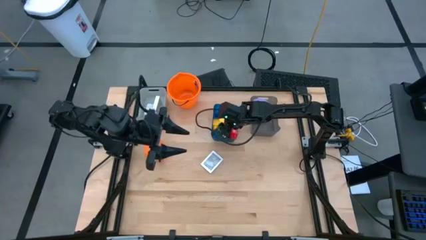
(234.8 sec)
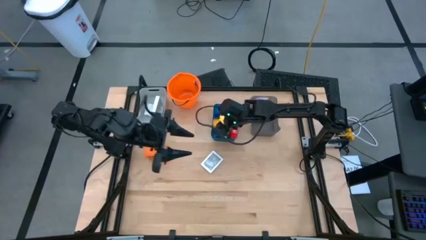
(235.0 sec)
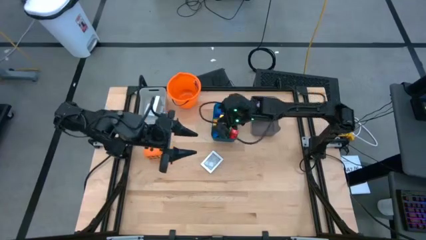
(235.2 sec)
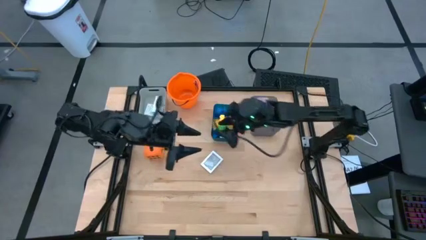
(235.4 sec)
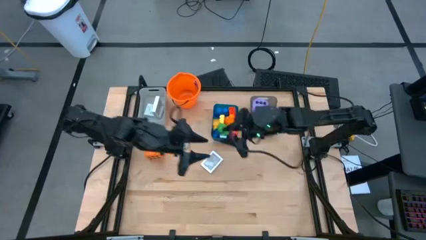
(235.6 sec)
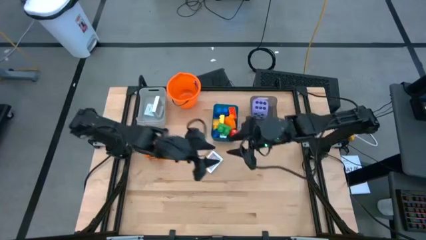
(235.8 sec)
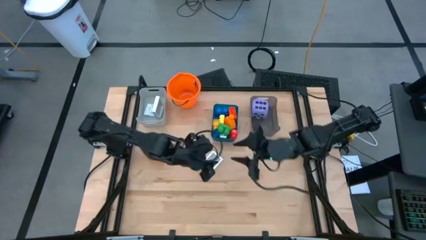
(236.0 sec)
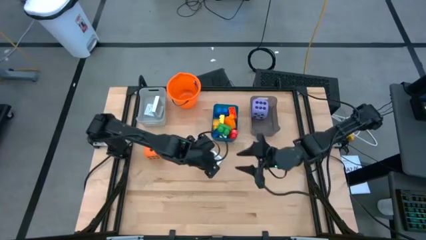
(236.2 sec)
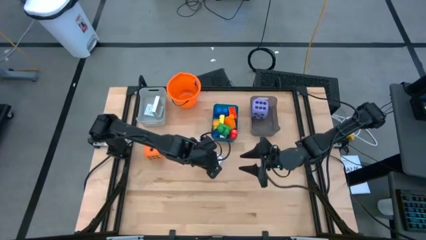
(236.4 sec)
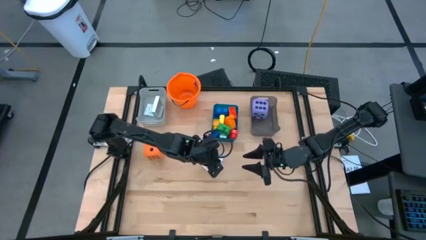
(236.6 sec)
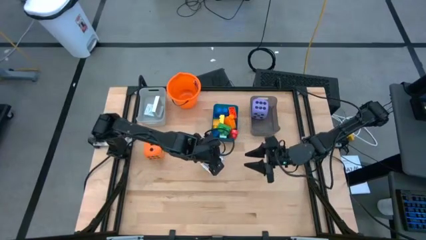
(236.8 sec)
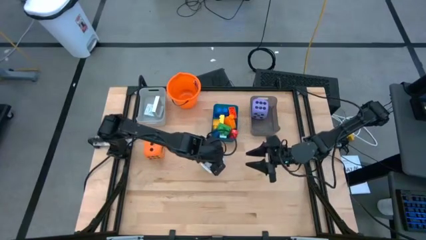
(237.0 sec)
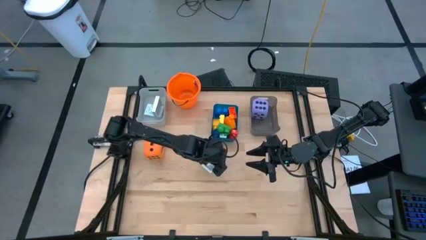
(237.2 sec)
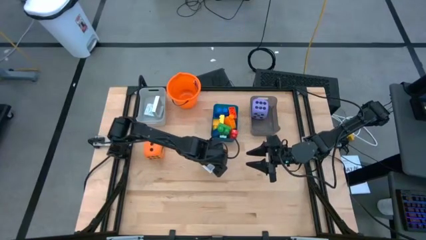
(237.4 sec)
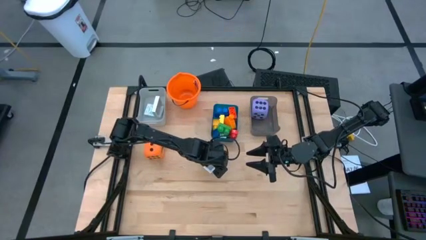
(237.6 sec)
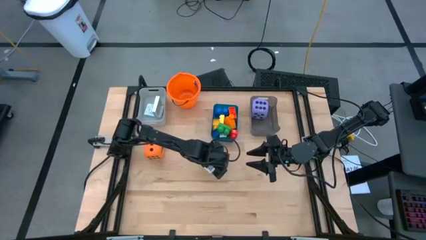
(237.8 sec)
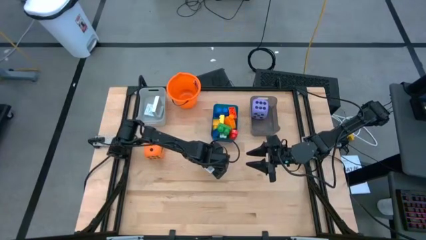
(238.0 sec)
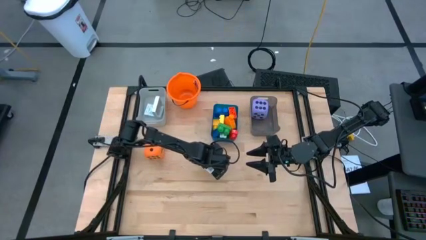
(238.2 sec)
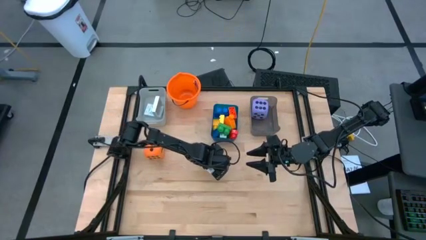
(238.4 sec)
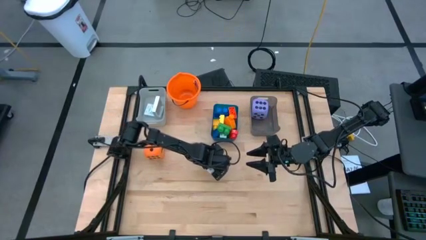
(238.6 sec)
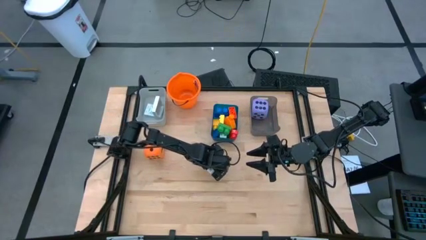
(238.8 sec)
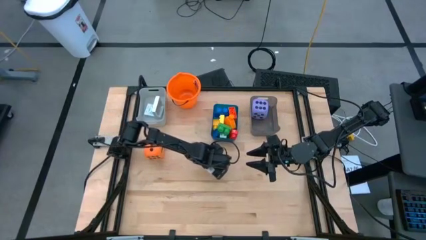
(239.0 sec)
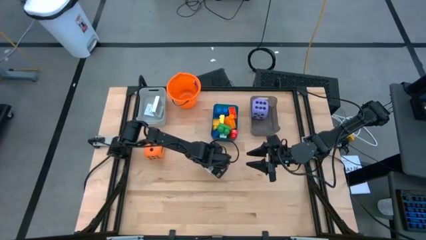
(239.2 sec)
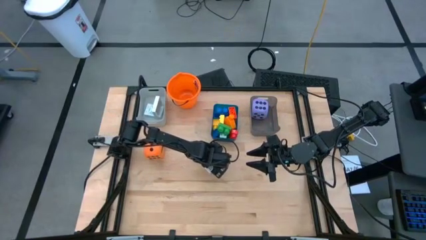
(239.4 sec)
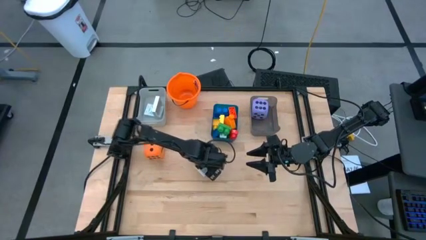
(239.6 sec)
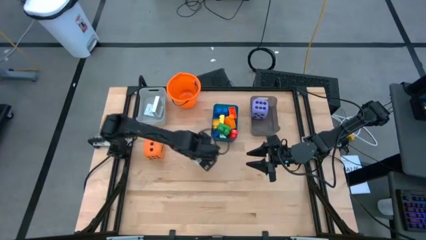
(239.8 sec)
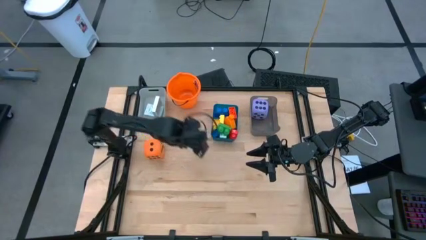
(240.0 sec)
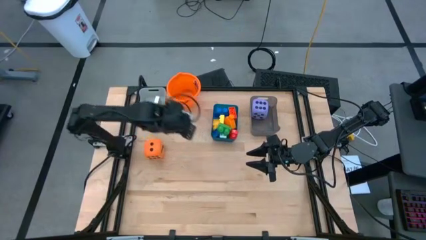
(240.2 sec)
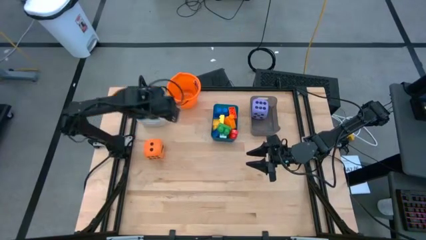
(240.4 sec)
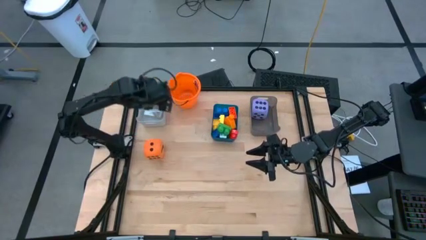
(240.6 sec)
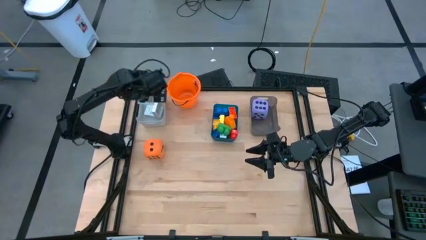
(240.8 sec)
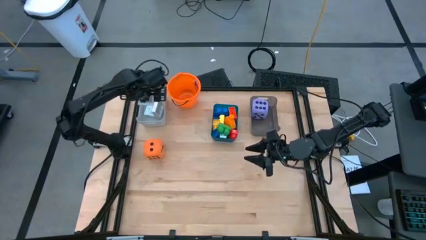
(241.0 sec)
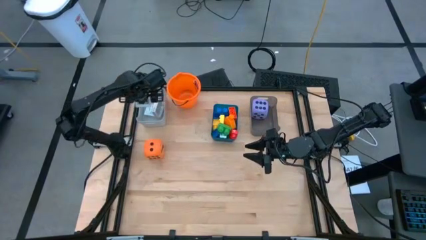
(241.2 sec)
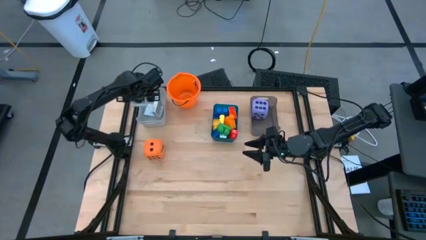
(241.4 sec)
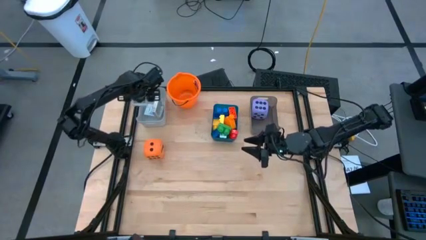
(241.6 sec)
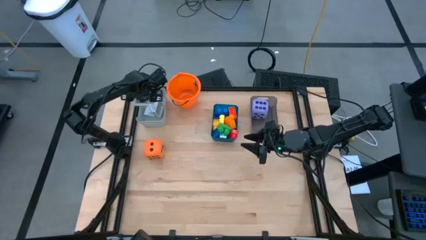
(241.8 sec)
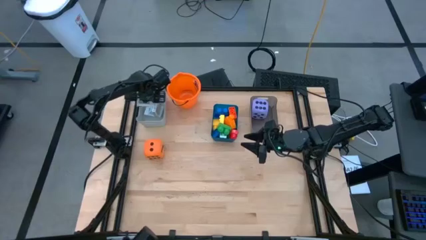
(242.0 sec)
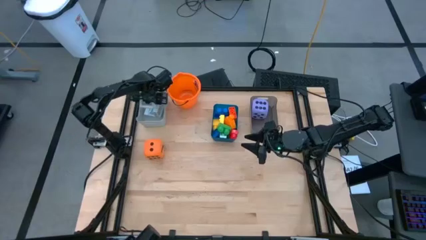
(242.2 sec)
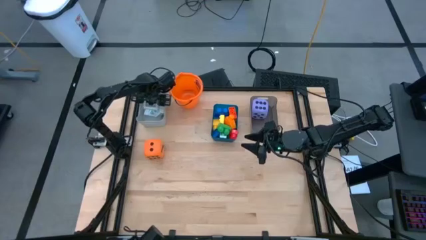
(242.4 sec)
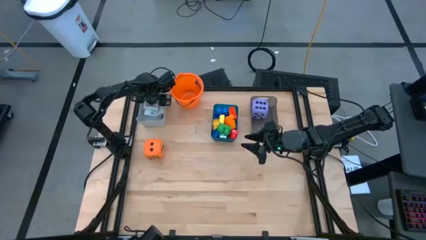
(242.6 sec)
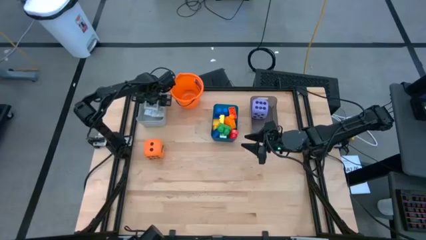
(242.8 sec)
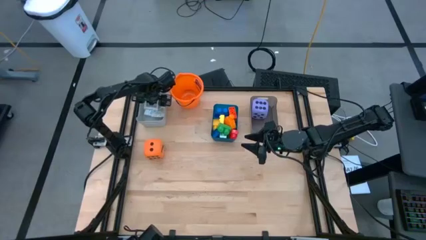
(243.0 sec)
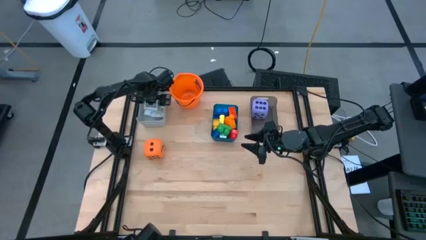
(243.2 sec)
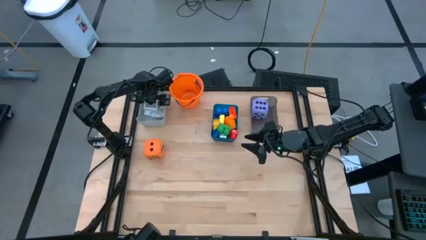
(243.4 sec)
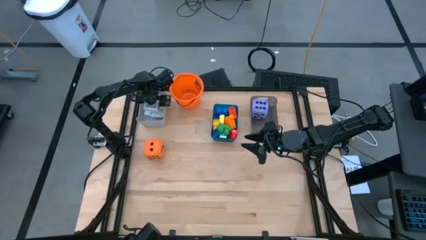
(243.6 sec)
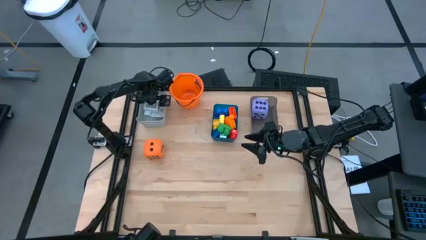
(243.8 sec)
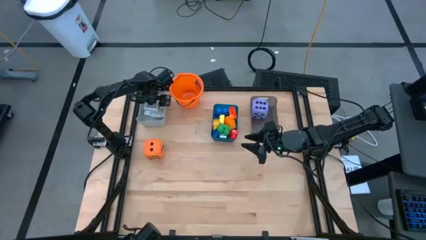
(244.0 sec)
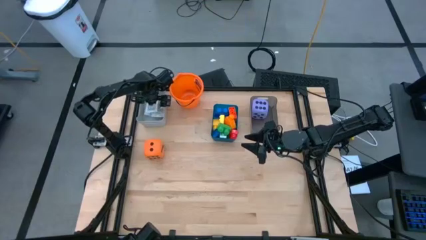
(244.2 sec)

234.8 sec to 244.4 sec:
Task: Pick & Place Toys
Put the black deck of cards into the gray bin

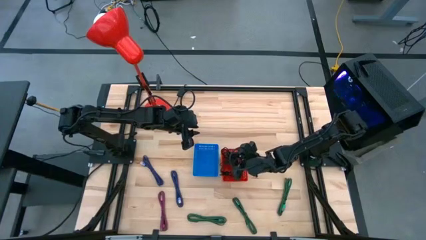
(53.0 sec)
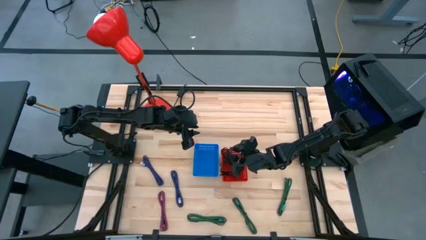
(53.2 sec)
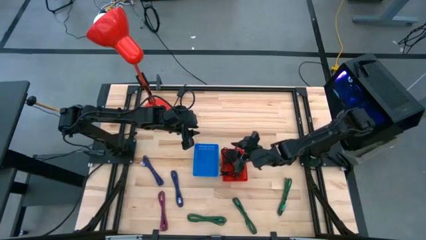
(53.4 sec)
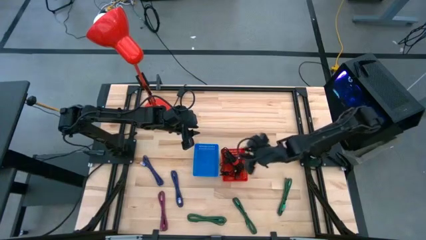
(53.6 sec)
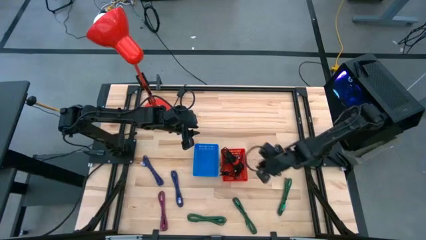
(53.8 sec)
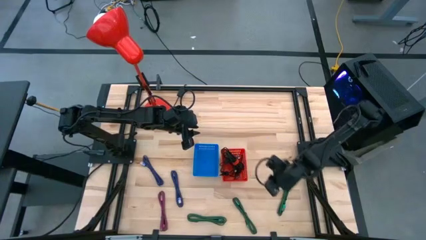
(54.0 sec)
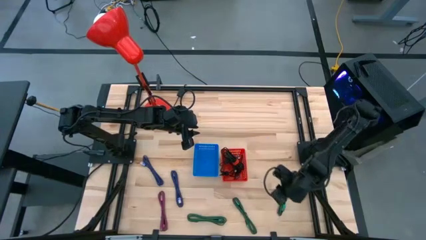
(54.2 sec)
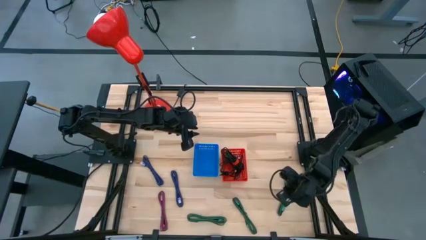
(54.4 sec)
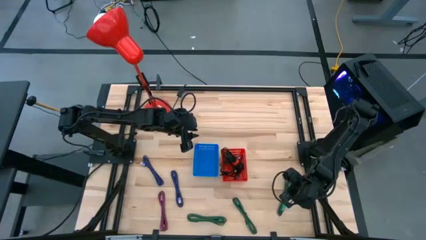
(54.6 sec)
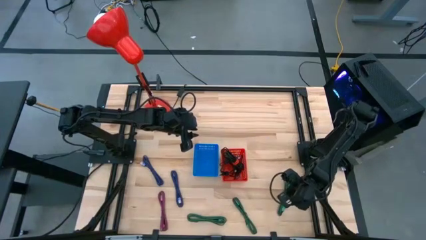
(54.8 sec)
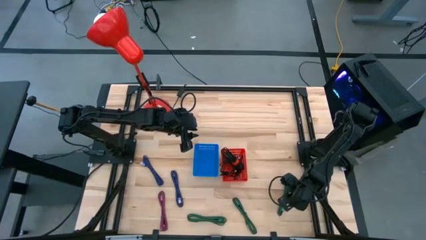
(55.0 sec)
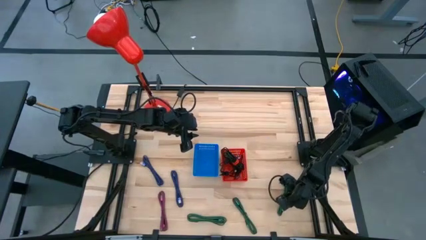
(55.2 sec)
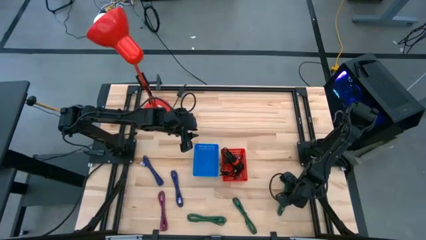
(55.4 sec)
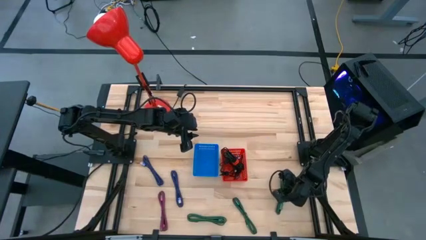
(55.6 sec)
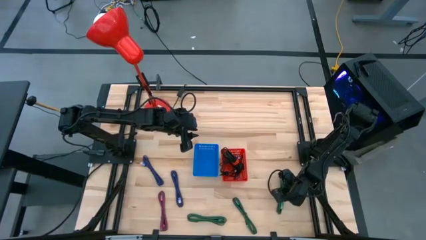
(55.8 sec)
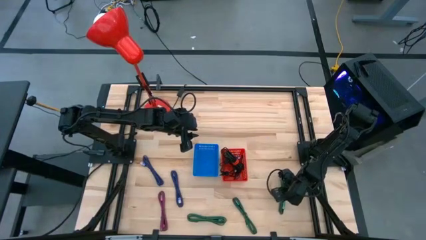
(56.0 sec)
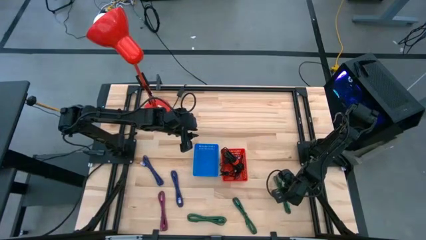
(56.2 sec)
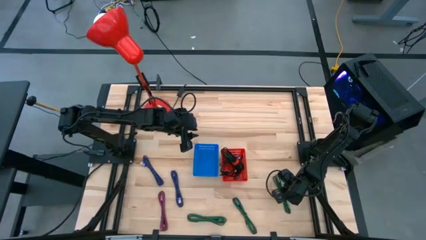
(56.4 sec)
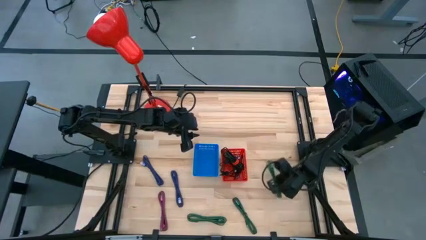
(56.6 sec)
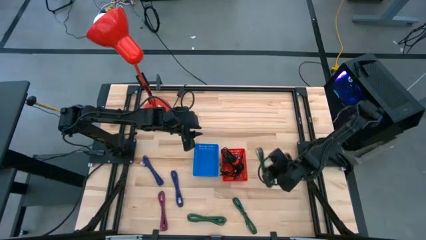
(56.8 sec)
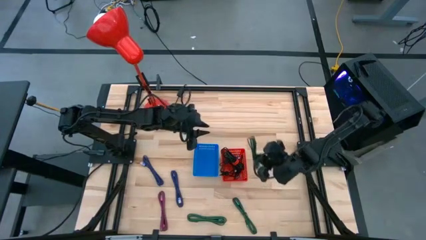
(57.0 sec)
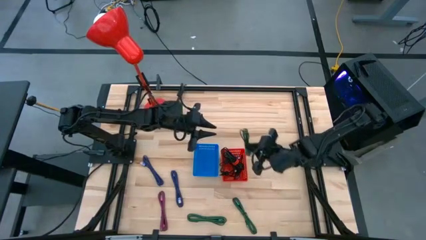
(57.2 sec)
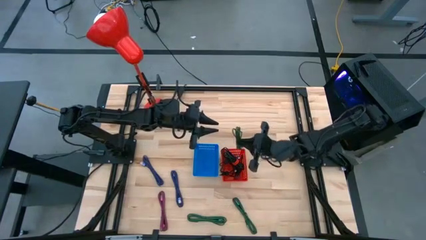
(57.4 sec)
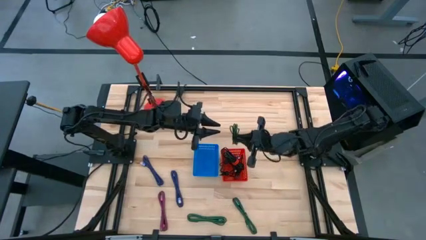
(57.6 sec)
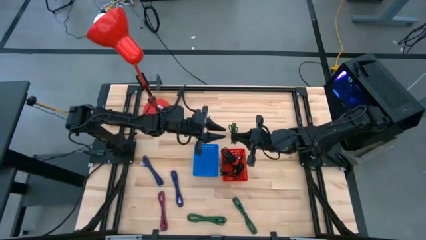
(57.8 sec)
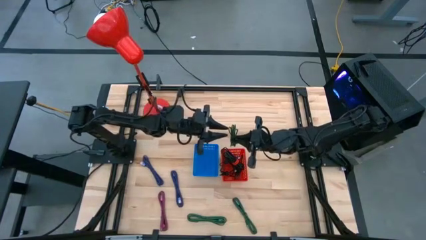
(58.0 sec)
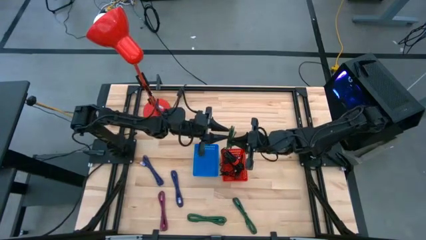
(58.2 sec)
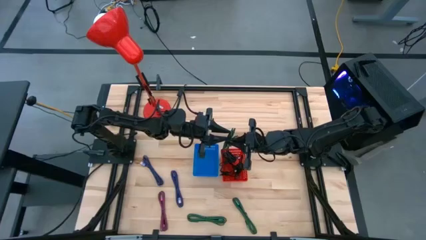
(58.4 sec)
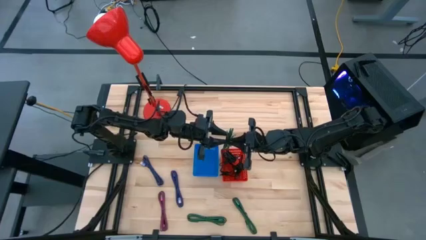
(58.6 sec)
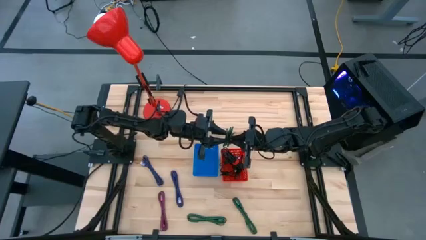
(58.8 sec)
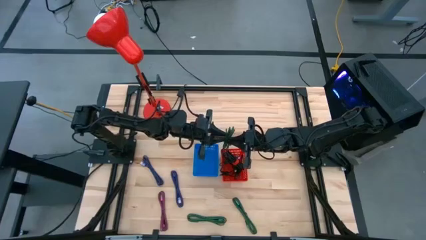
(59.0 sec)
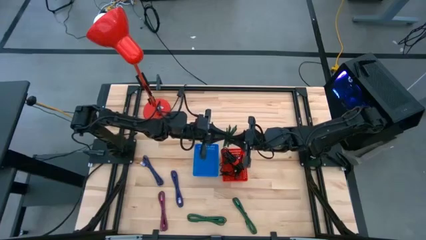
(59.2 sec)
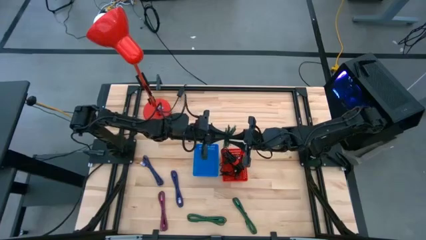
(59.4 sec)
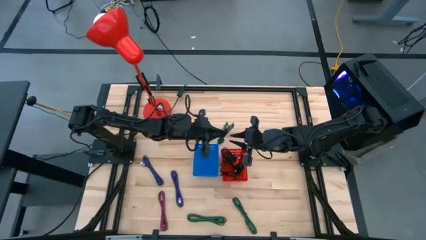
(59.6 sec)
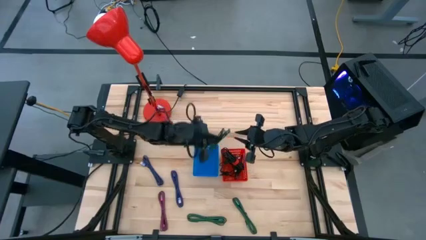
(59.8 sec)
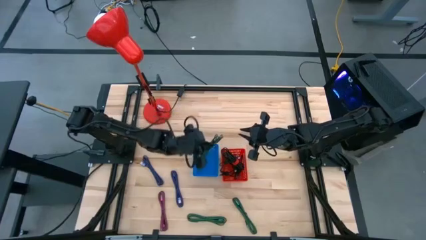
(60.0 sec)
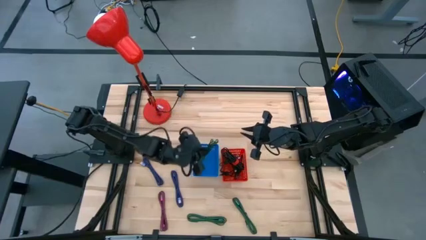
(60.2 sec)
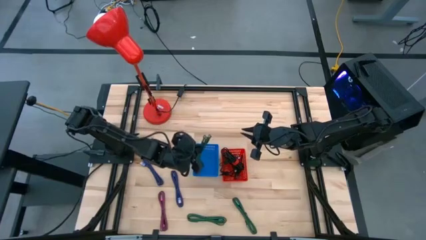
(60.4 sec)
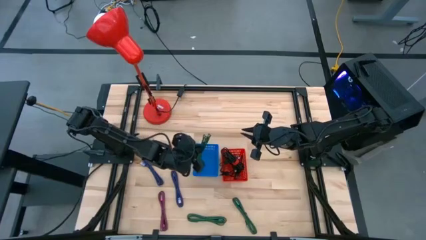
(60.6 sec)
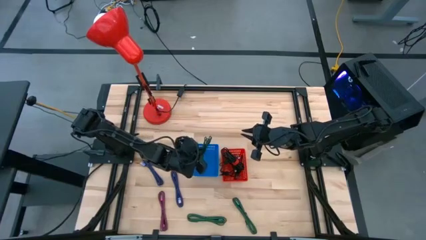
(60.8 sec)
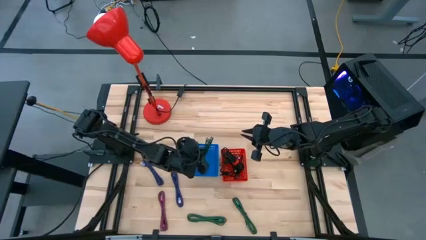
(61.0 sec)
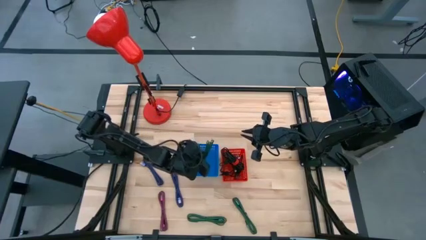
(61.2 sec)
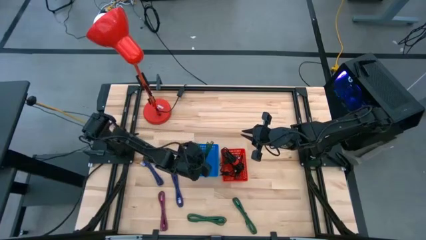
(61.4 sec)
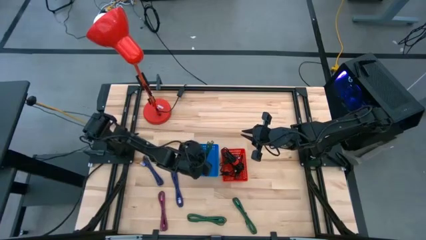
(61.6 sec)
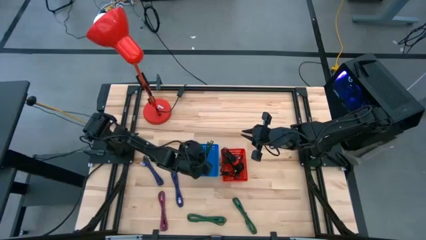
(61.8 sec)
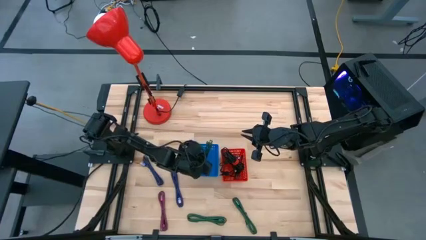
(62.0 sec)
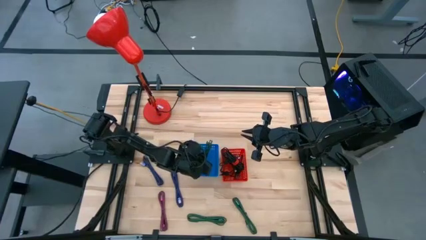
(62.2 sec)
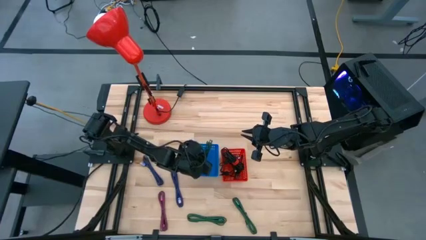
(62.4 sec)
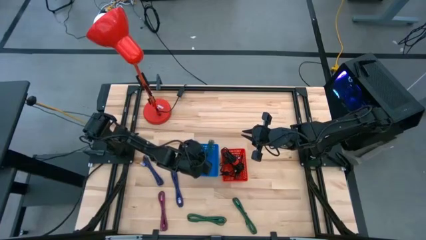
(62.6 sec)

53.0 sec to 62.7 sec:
Task: Pick & Place USB Port
Put the green charger cable into the blue bin
